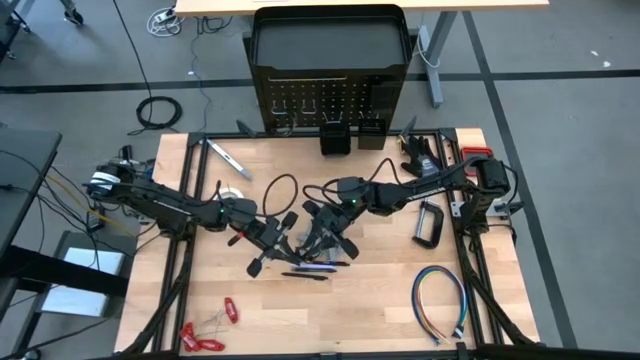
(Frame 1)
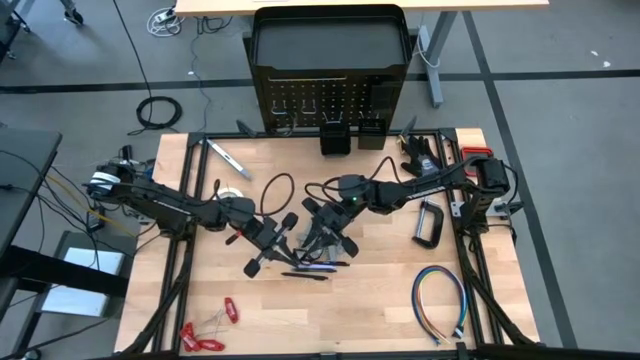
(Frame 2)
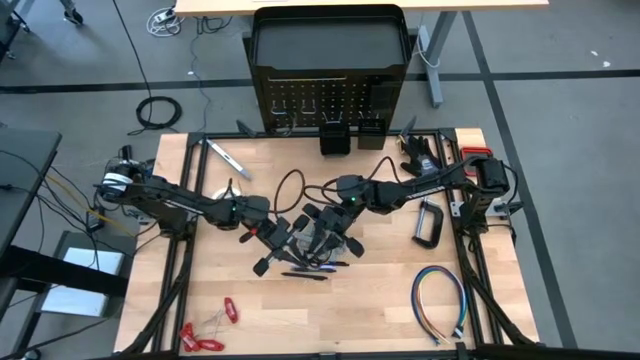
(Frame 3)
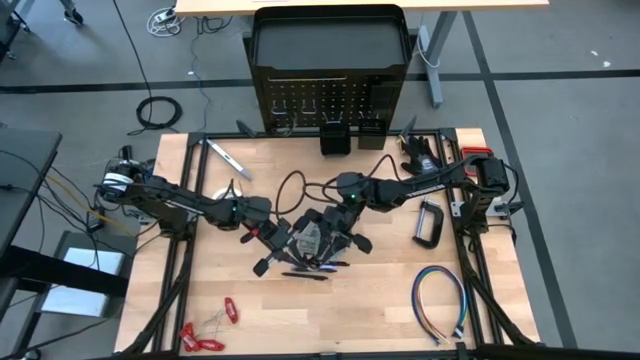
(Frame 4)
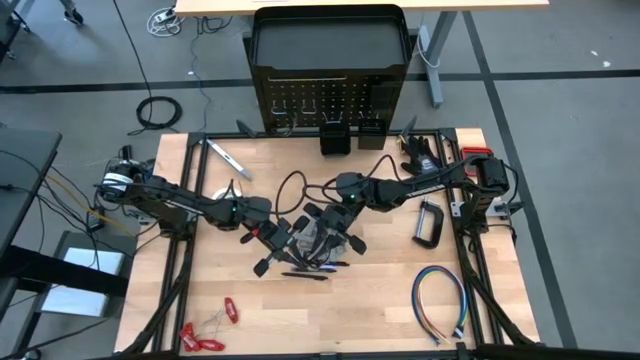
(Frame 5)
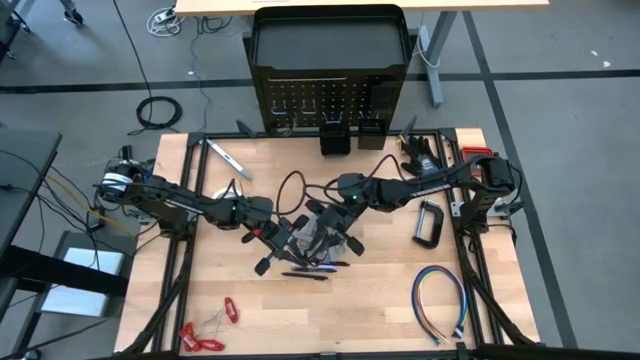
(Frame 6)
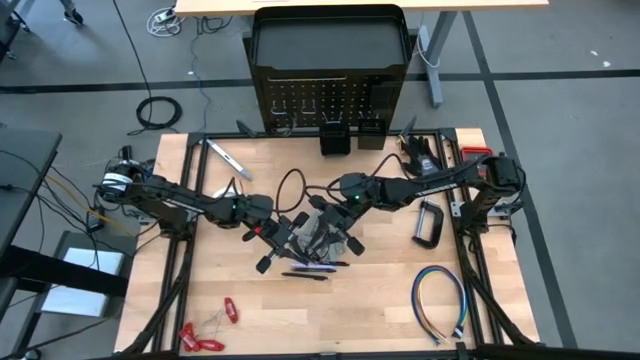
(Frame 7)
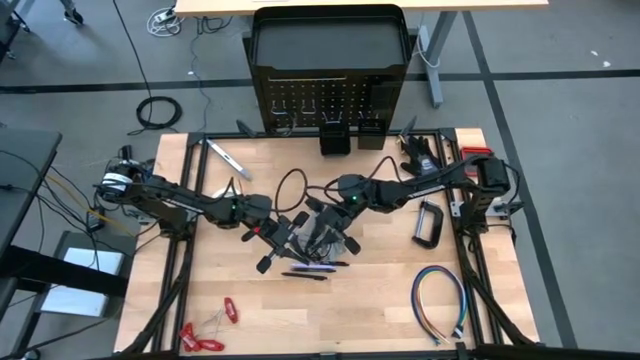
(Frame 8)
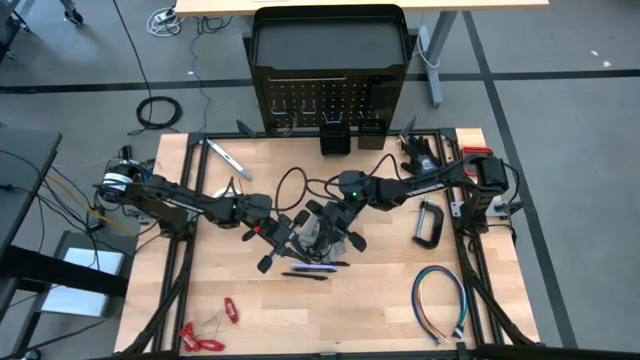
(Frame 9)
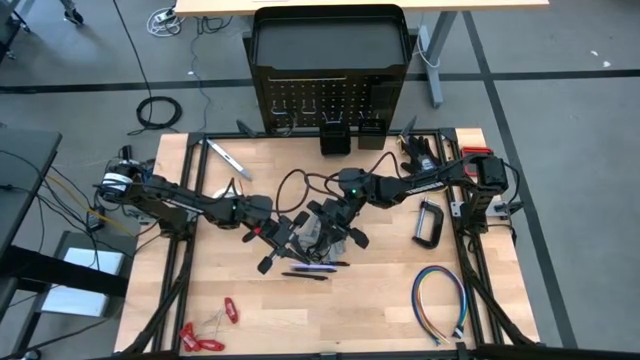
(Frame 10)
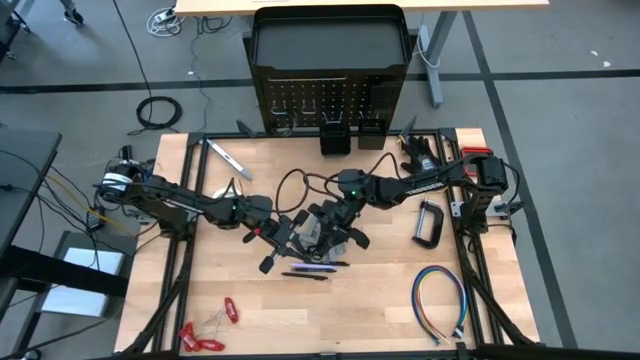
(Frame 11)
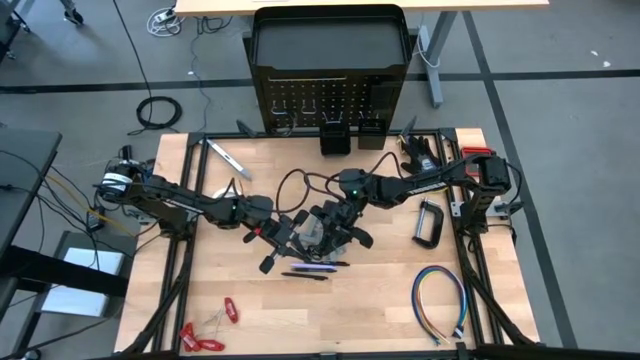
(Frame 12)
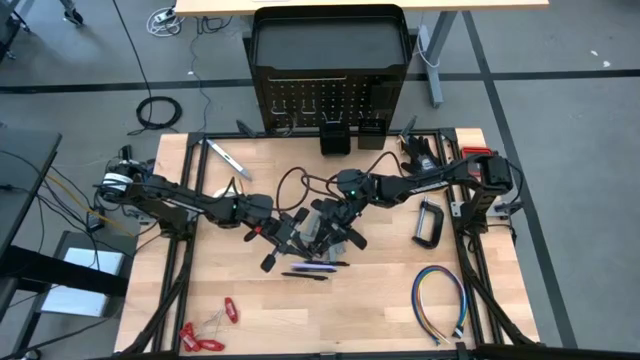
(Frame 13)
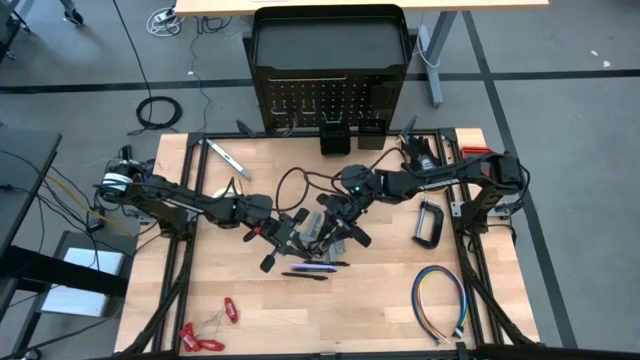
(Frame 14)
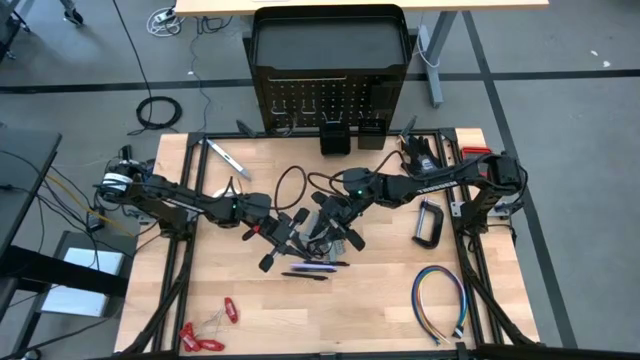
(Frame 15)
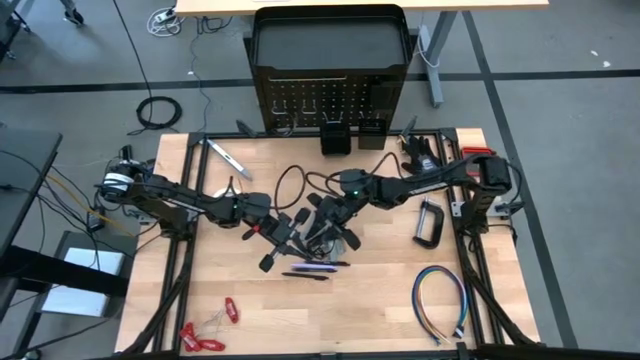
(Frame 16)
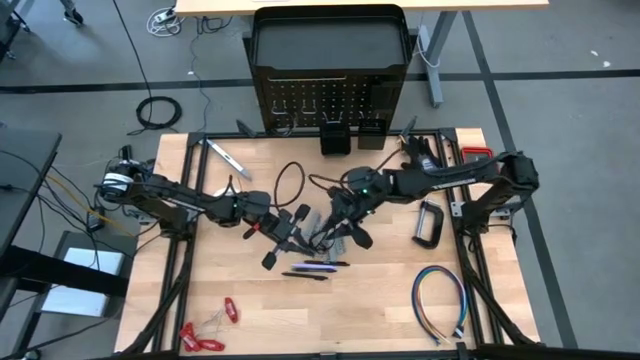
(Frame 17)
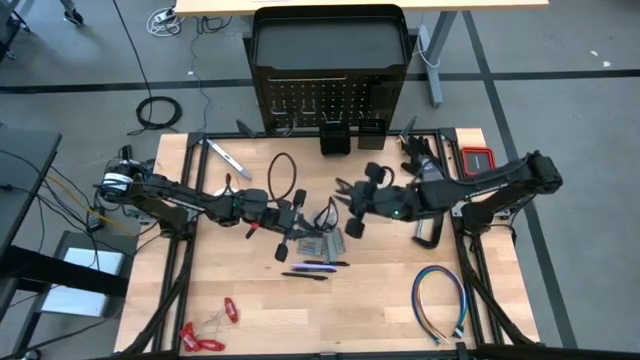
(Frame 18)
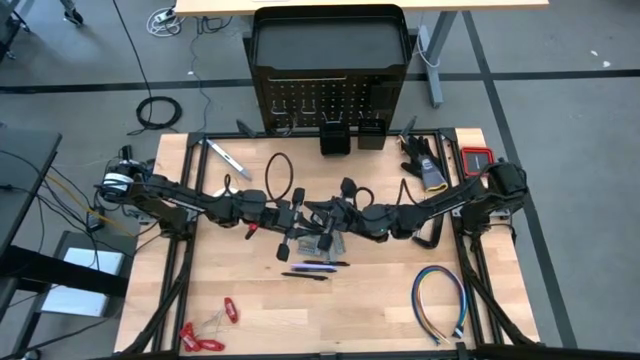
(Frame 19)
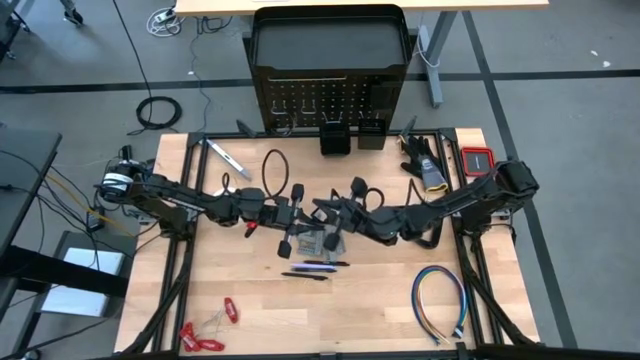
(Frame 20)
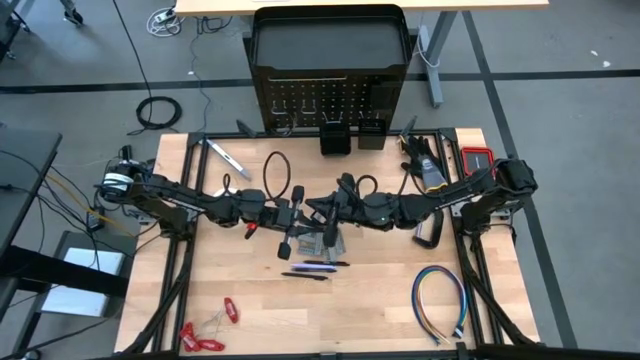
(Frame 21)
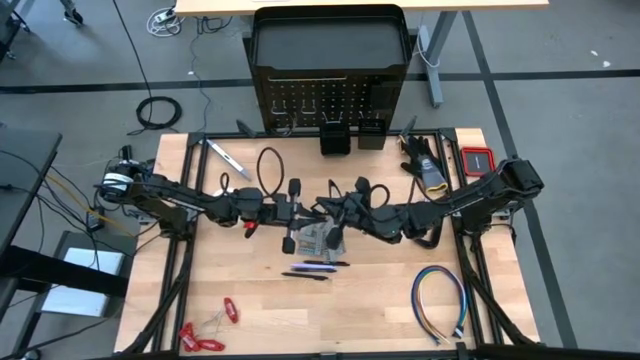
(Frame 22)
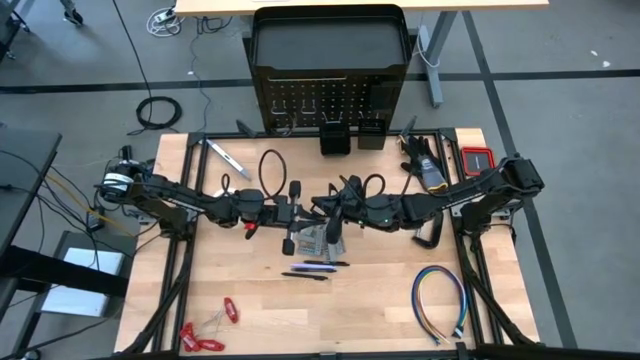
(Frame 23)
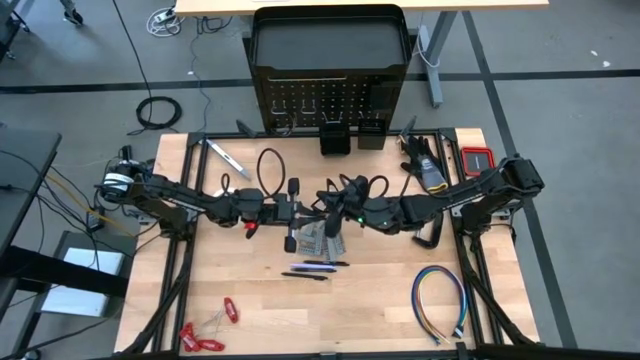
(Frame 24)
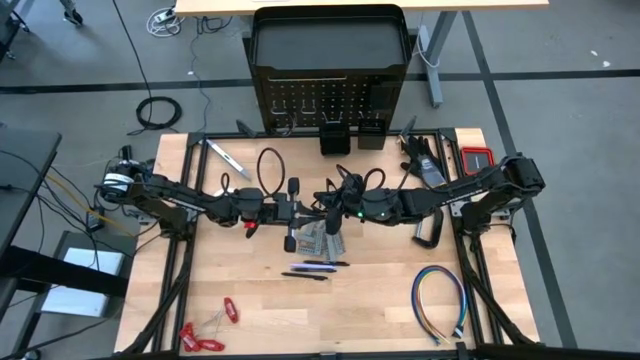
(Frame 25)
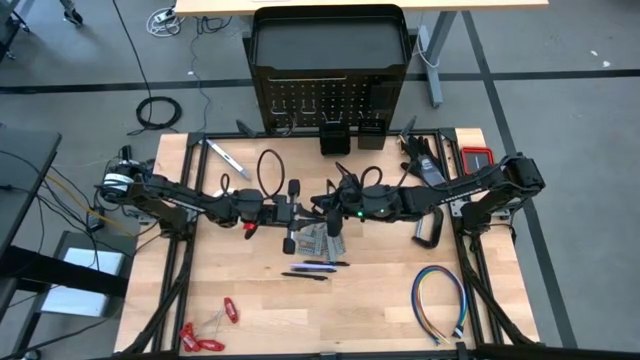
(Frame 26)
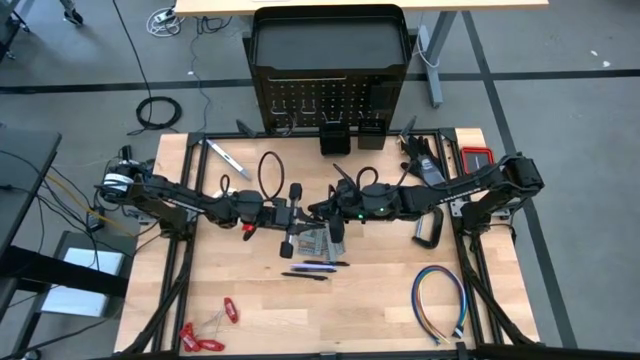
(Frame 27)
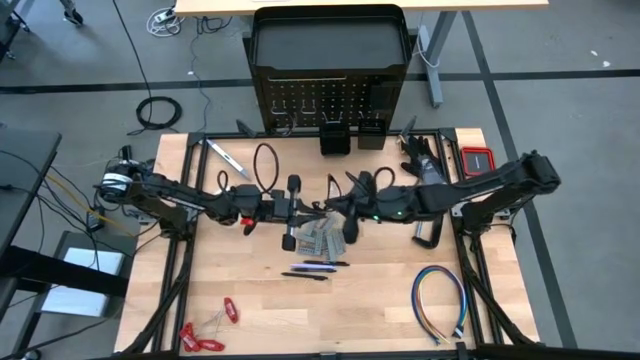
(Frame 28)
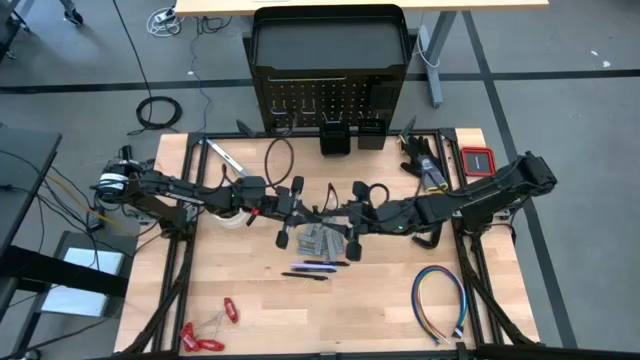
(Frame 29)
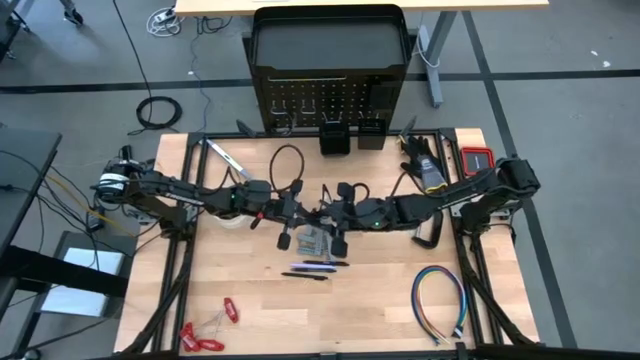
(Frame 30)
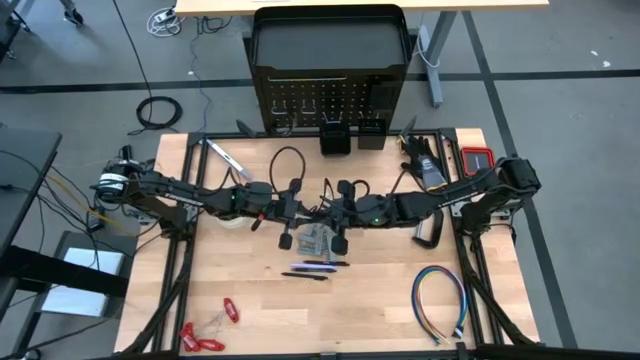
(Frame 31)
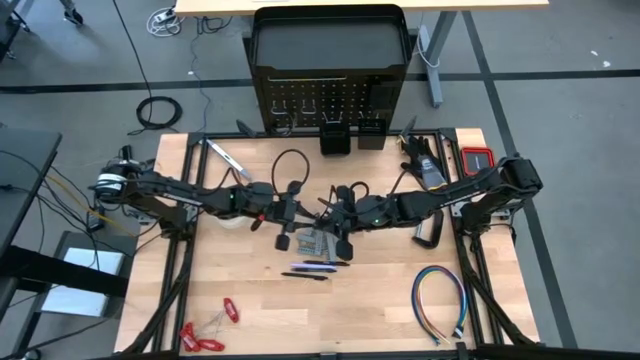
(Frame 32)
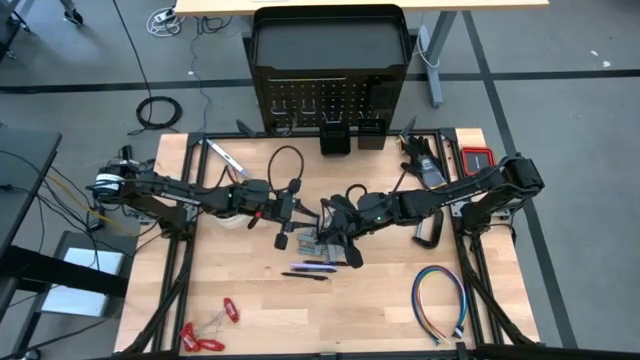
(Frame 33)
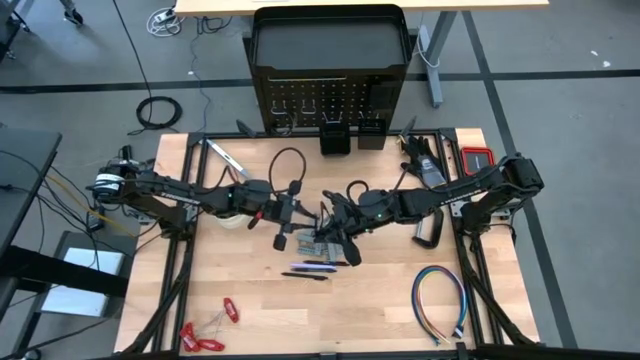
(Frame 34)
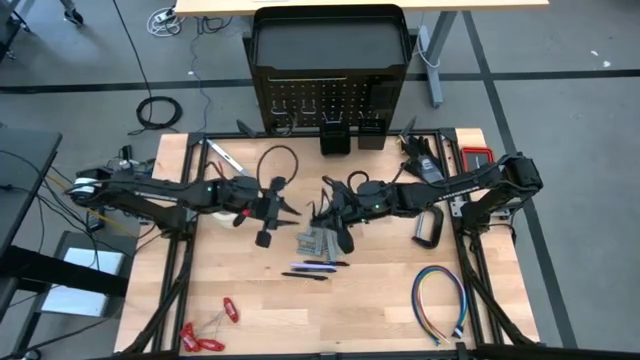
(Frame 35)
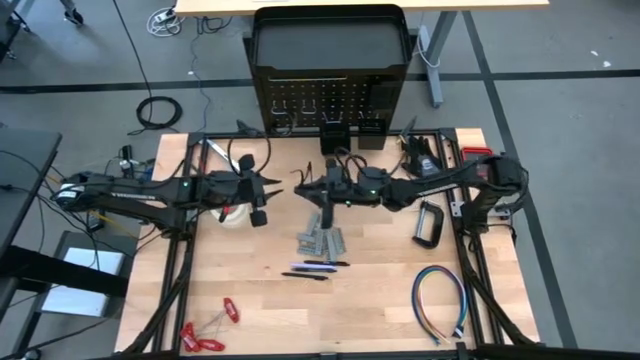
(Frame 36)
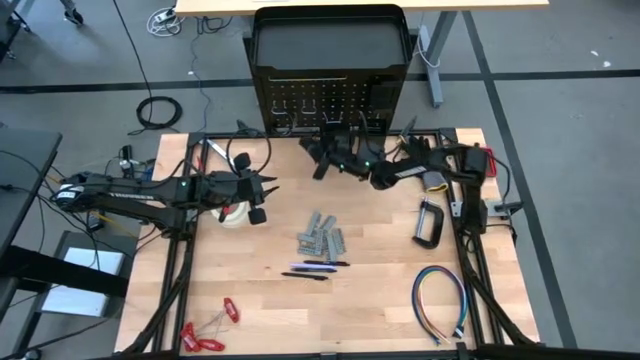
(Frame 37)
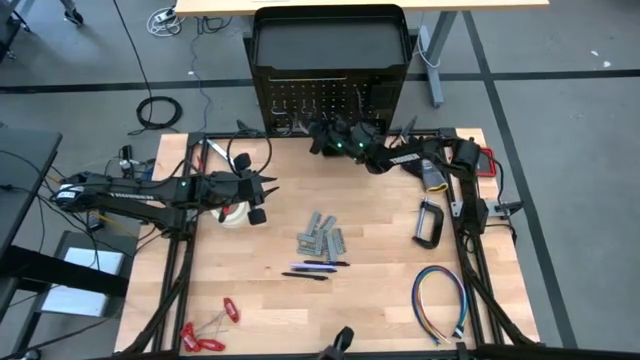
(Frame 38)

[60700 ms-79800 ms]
Task: Hang tools onto peg board
Hang the black safety glasses on the peg board

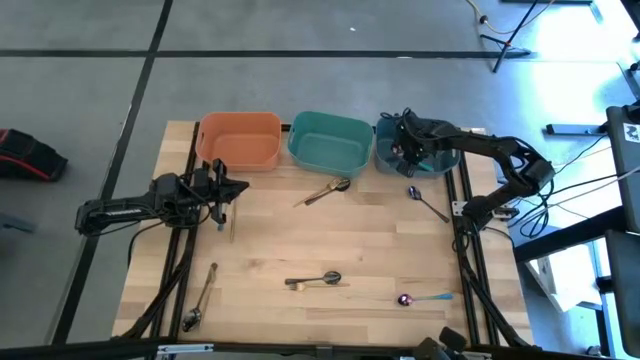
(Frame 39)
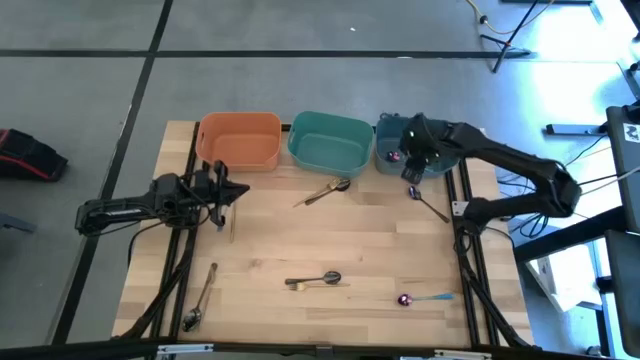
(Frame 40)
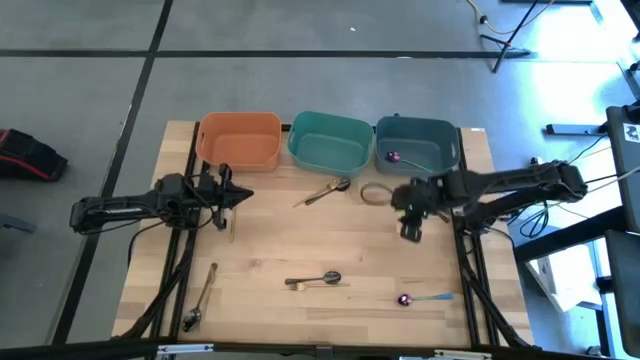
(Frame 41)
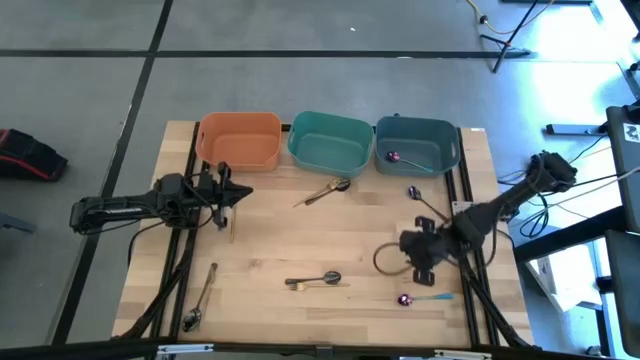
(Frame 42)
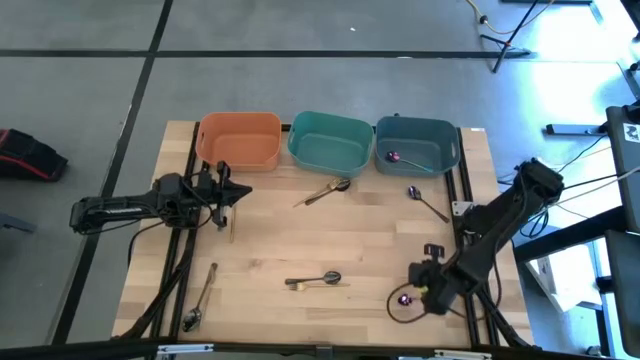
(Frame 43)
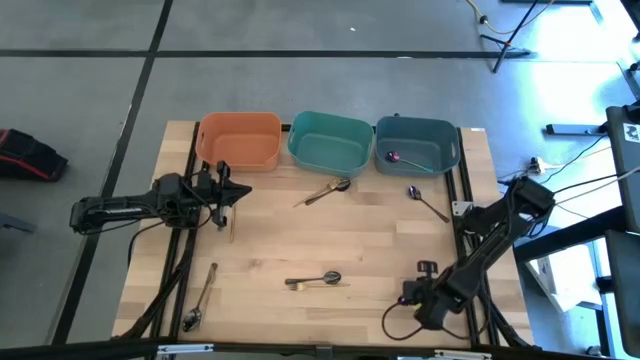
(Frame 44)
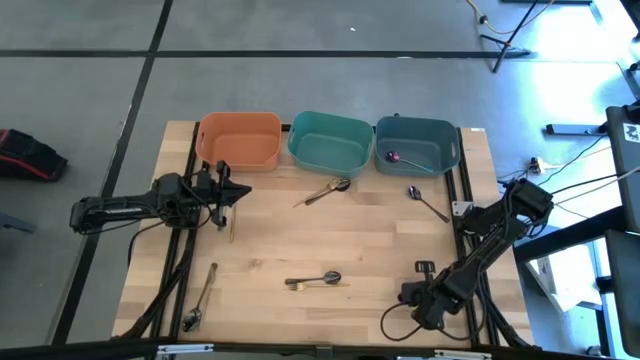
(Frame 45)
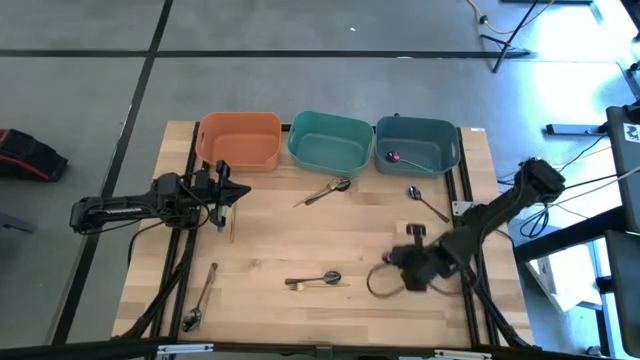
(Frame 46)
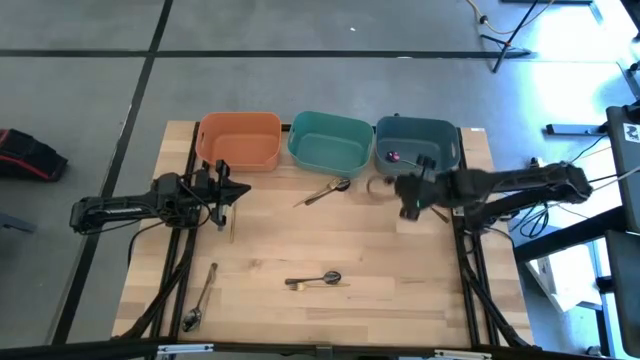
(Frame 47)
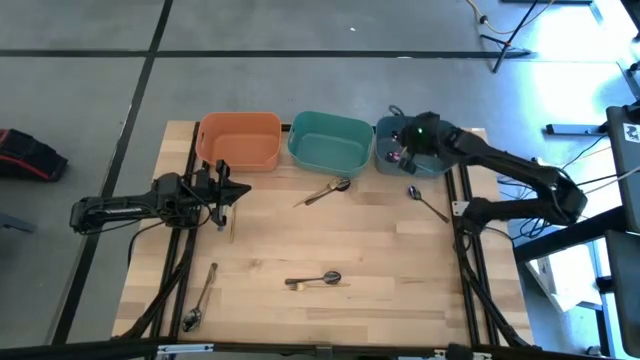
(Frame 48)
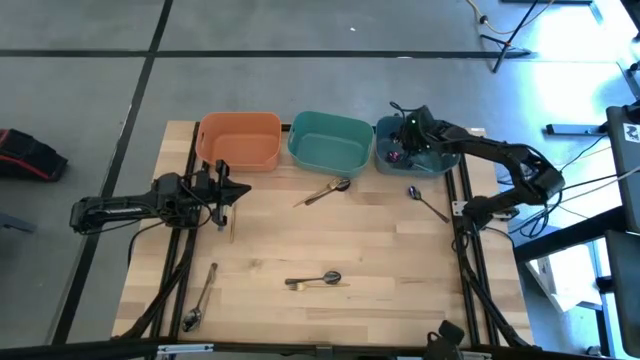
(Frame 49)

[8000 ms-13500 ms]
Task: Sort silverware by color (type)
Put the blue spoon into the blue bin
